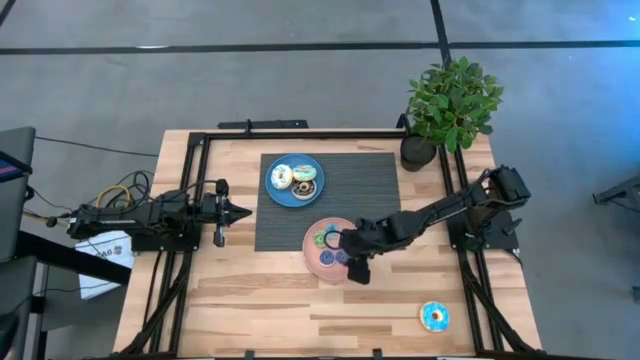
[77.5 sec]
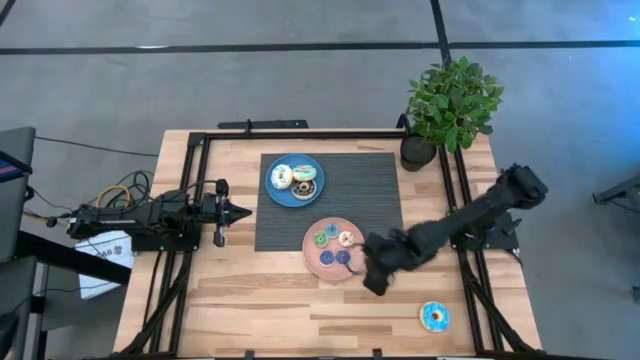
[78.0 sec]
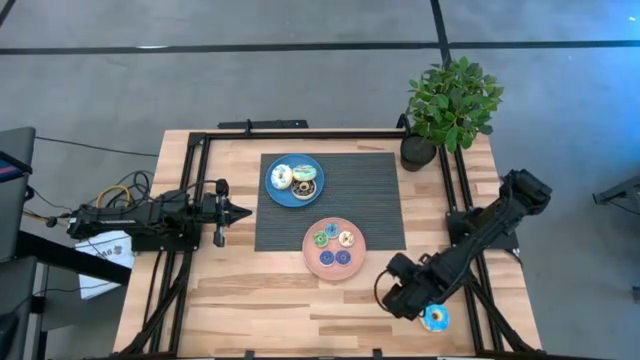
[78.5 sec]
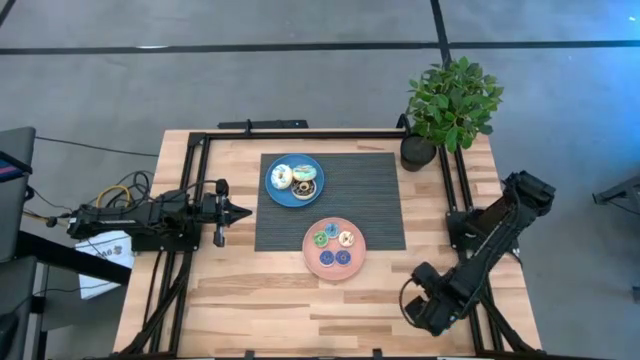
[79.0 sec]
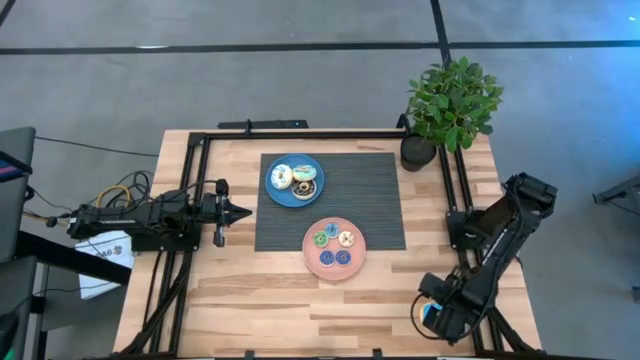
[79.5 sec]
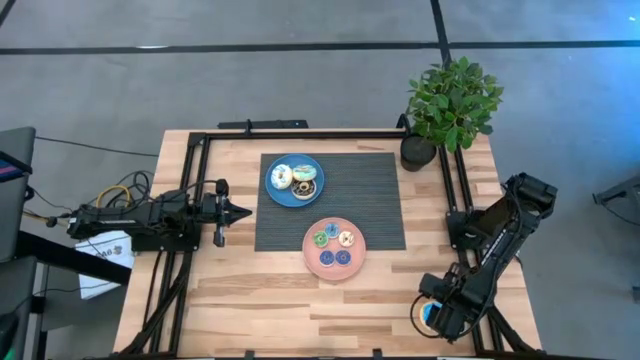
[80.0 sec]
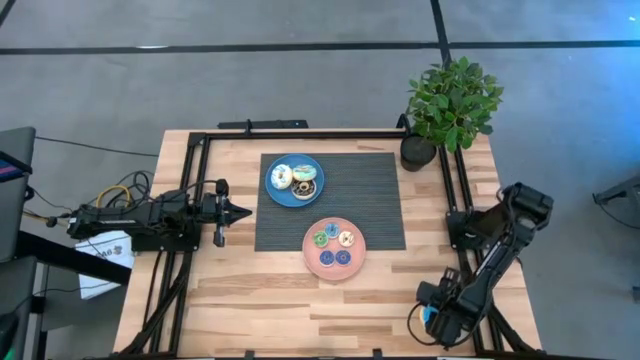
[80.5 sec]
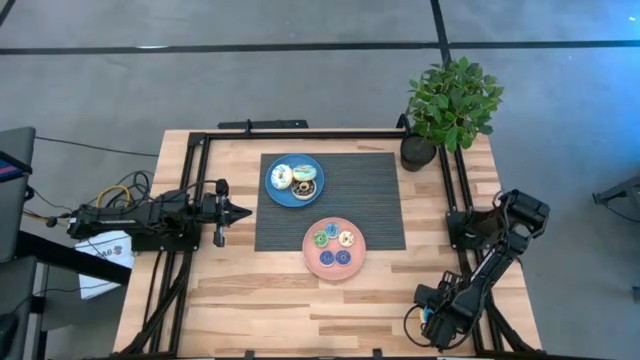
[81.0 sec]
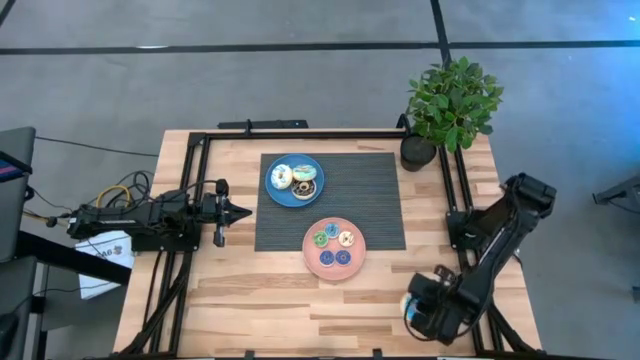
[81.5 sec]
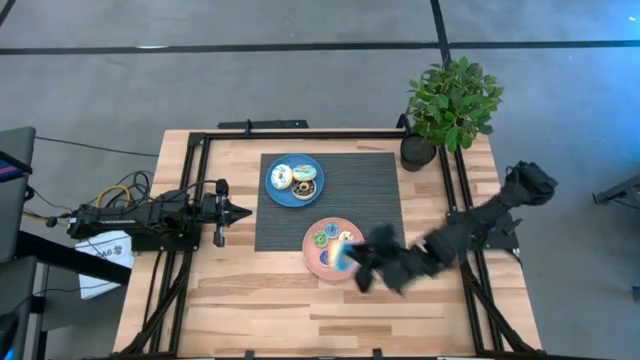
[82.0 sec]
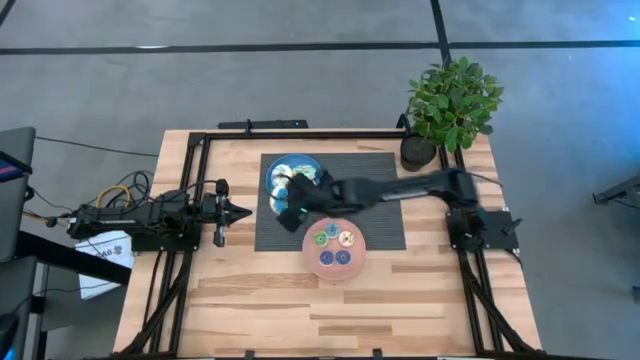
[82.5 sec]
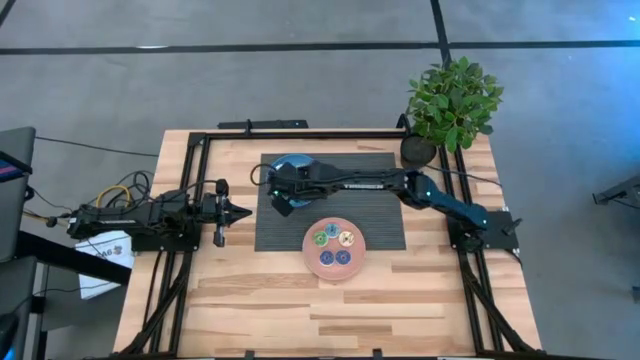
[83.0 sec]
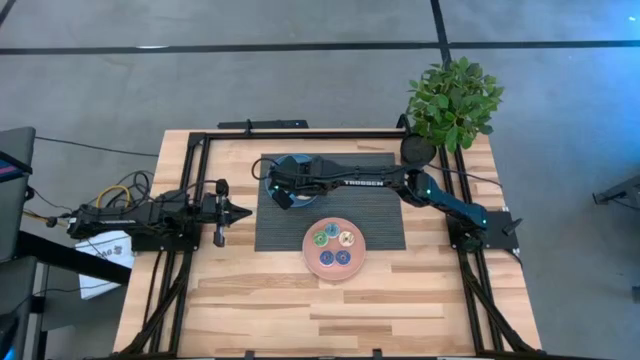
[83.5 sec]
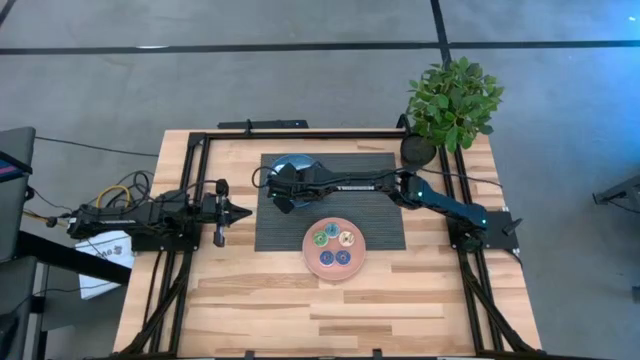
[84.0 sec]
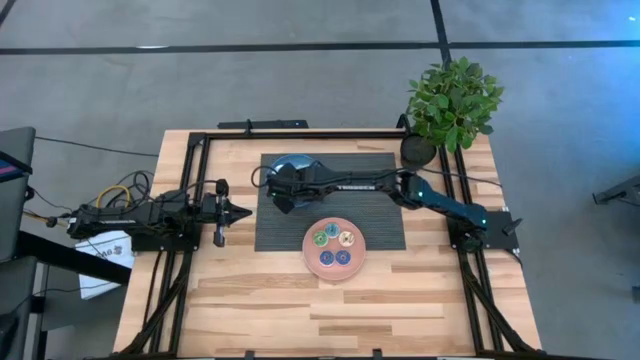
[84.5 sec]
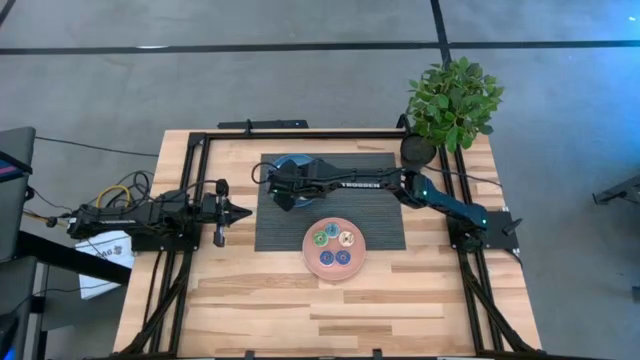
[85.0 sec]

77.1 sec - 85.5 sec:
Task: Pick & Place donuts
Put the large blue donut on the blue plate

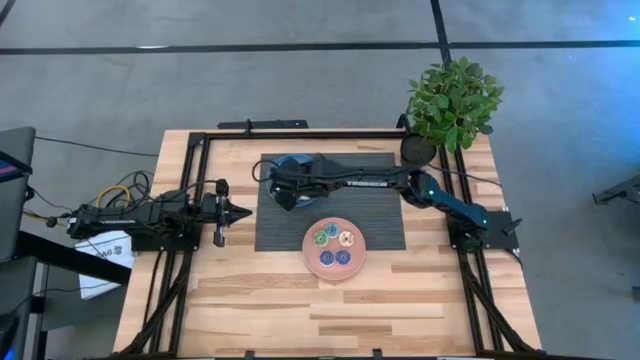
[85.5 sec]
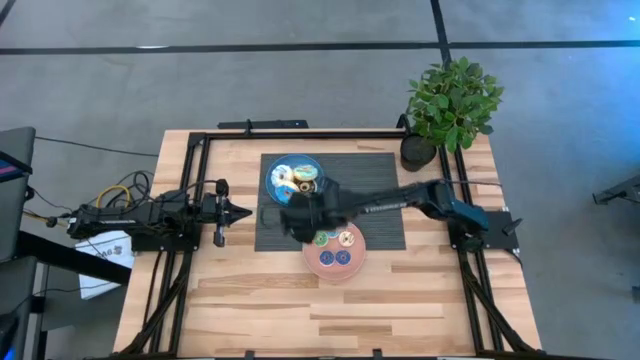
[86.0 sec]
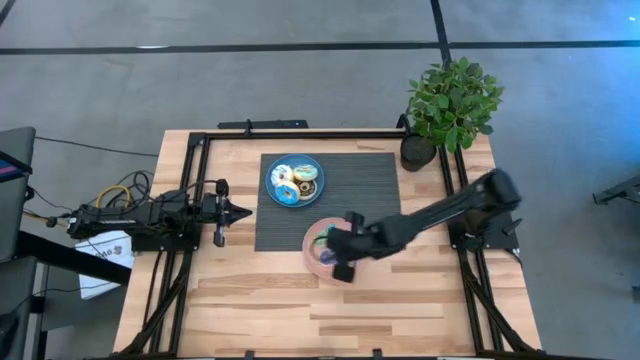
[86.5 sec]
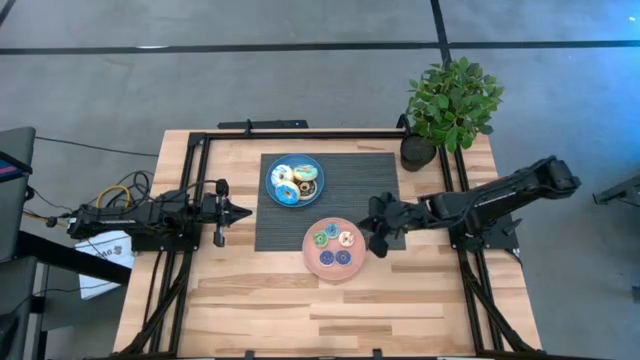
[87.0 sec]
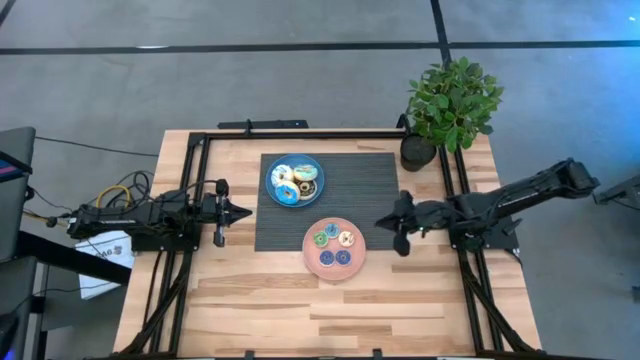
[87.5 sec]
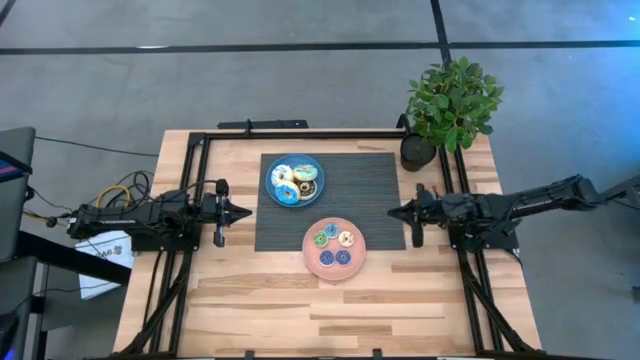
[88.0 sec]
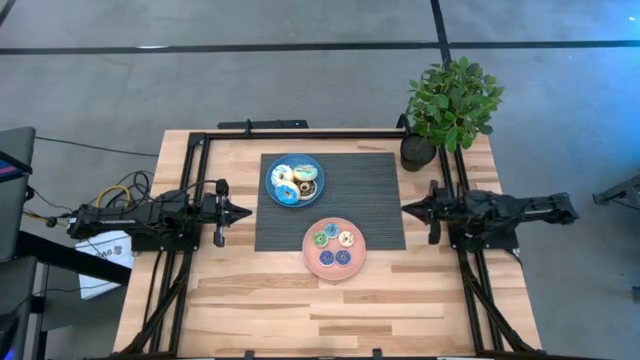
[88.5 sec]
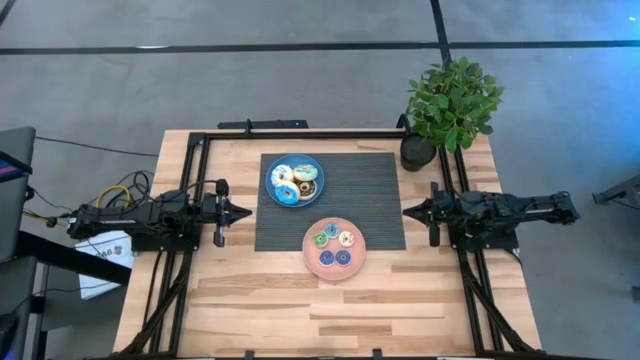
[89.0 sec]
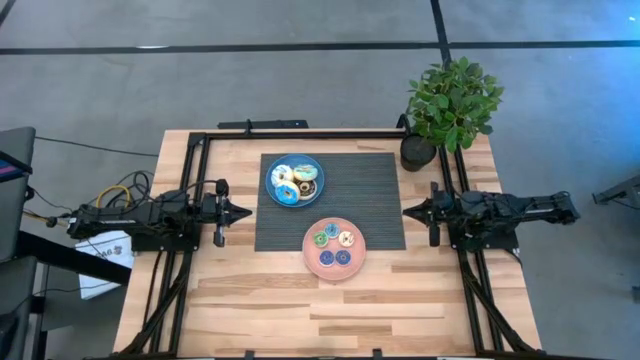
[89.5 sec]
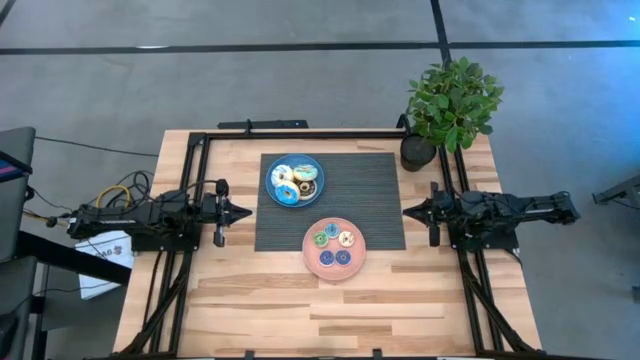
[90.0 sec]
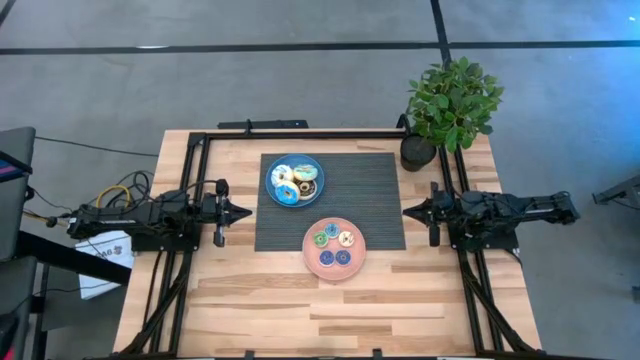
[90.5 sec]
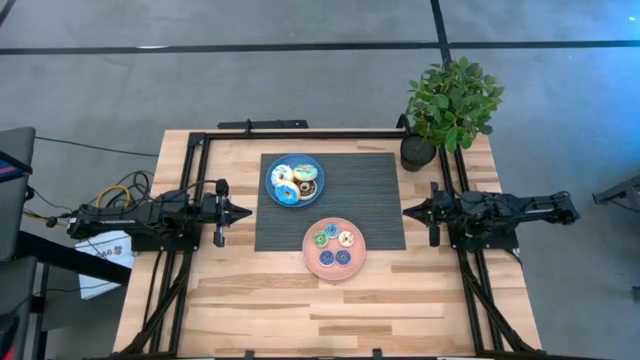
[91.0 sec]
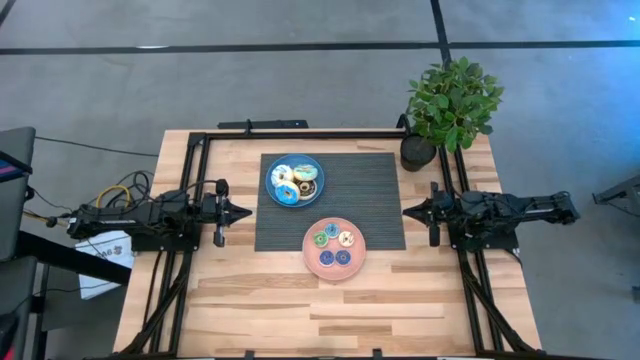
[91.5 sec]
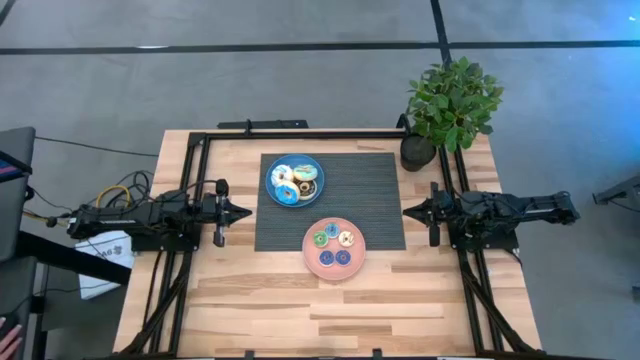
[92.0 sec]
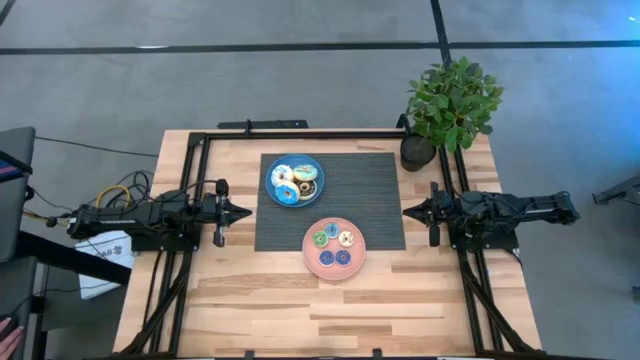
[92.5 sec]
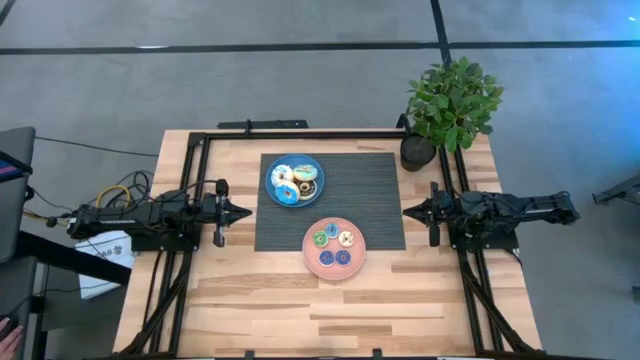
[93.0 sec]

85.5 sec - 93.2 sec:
Return to Home Position

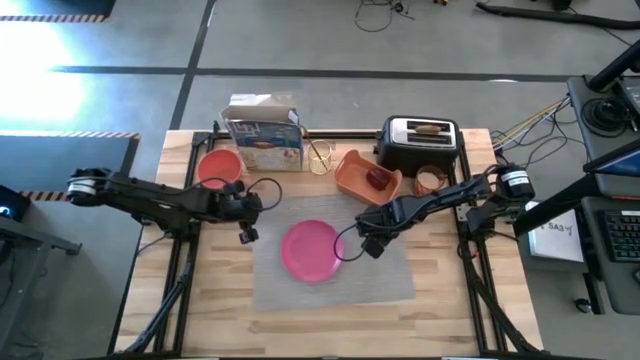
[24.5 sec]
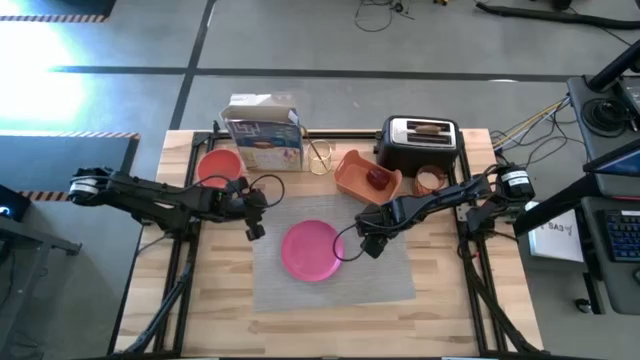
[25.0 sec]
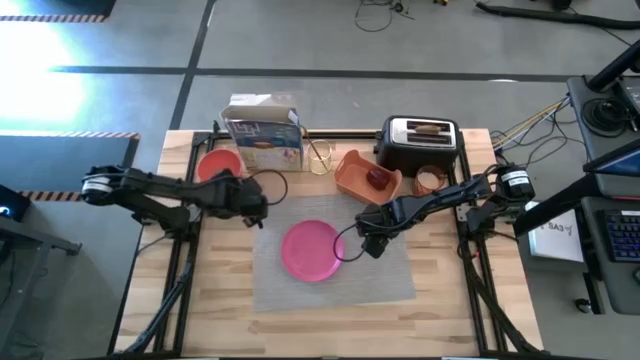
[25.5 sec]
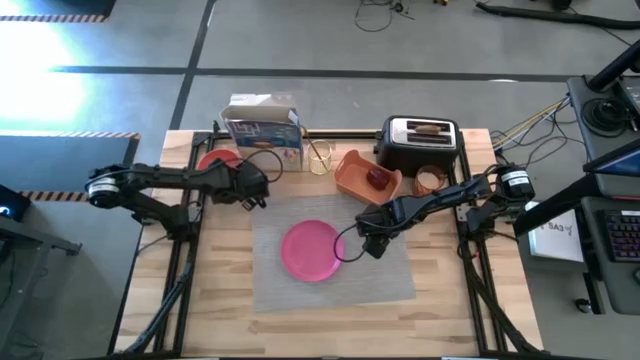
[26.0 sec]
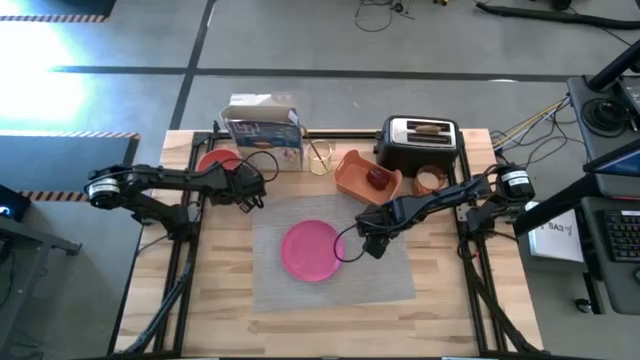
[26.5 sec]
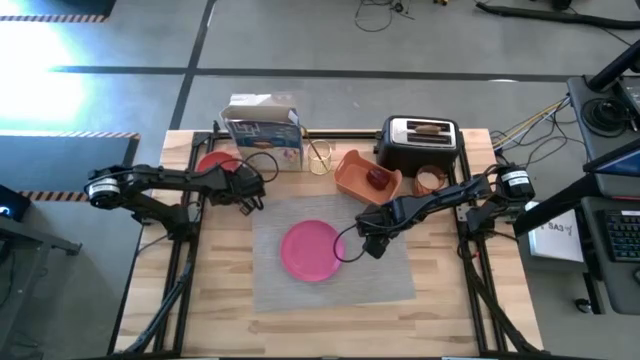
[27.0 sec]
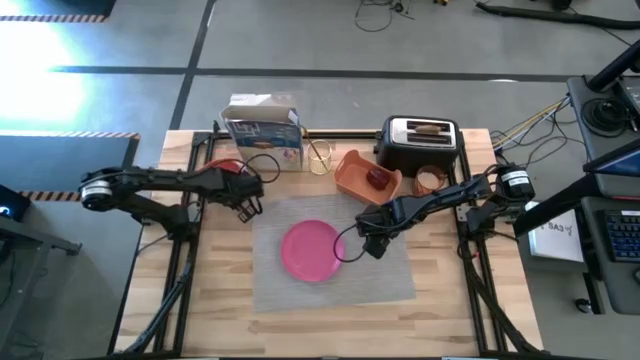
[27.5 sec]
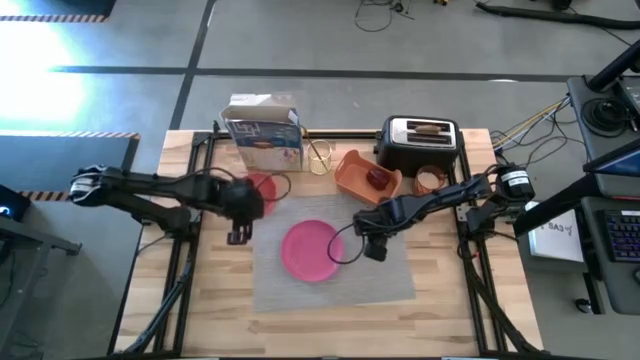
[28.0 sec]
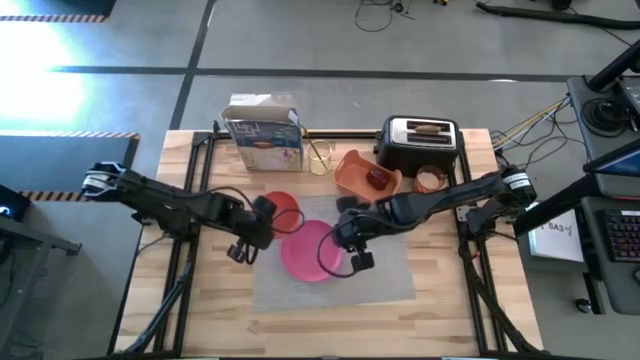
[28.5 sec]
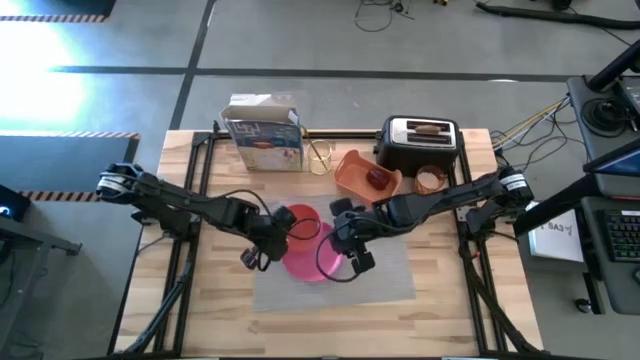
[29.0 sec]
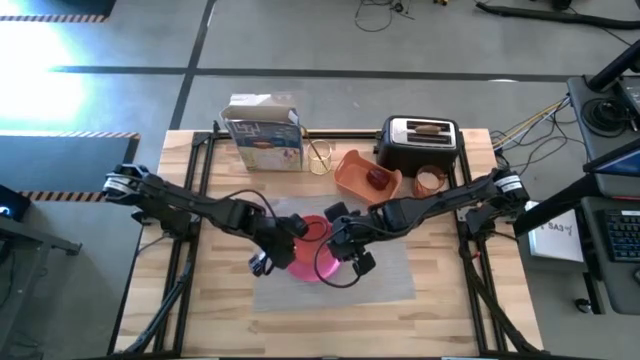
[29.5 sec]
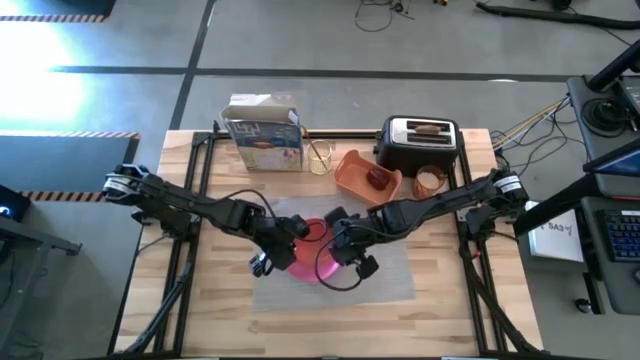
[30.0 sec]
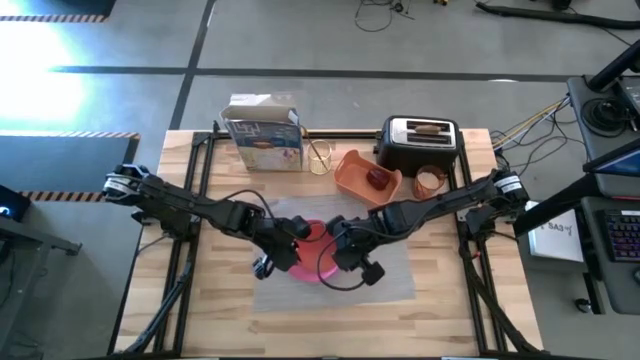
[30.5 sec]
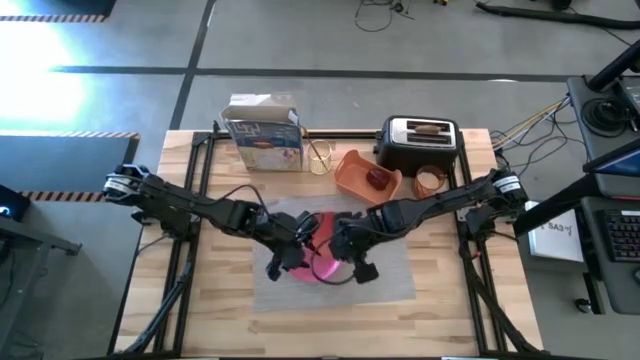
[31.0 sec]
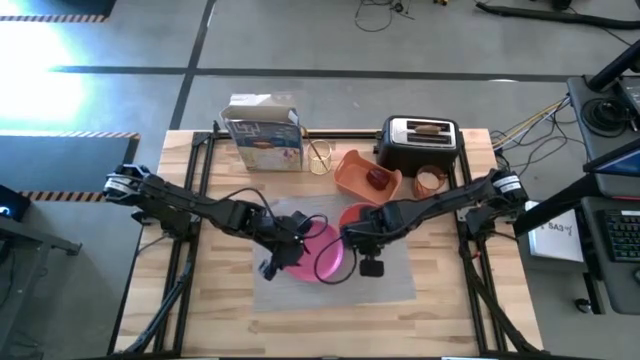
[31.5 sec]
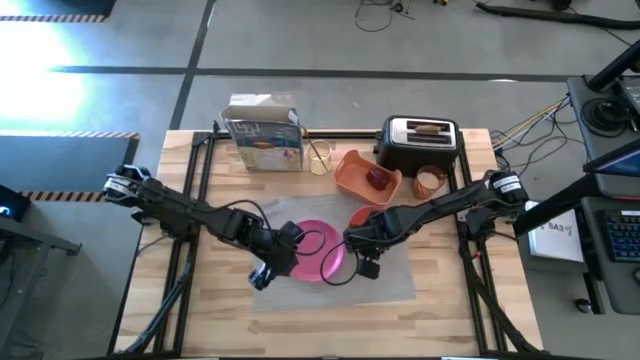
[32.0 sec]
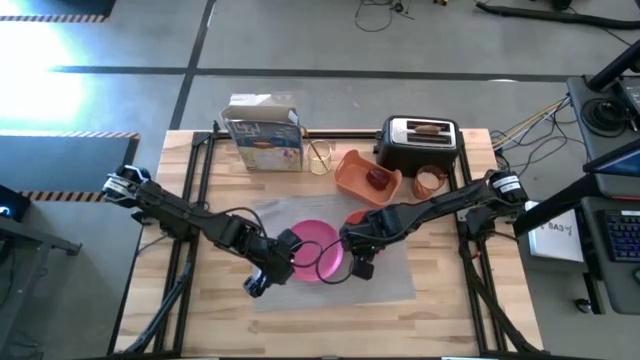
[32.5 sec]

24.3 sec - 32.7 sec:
Task: Arrange a breakfast setting
Put the orange bowl on the gray table mat
